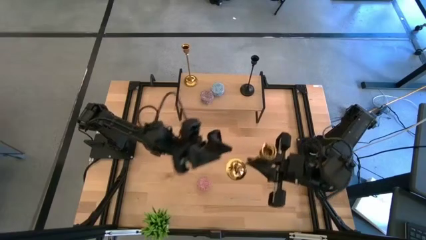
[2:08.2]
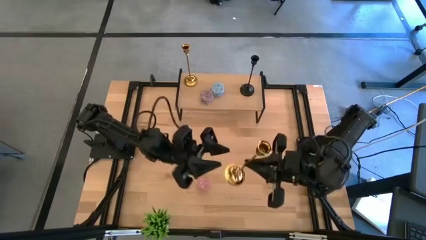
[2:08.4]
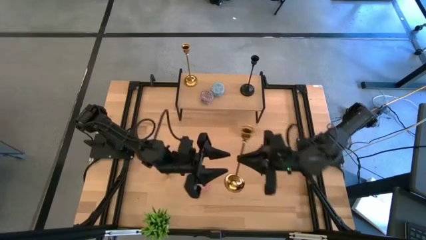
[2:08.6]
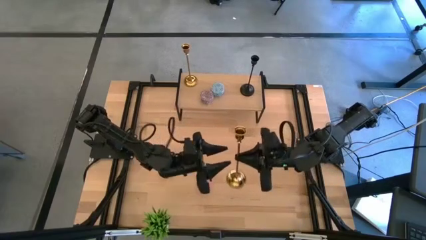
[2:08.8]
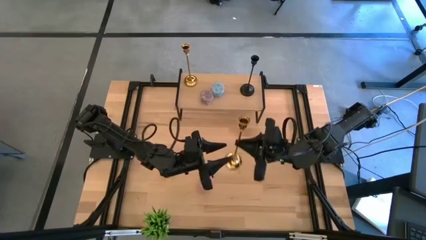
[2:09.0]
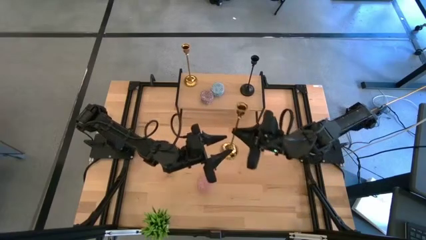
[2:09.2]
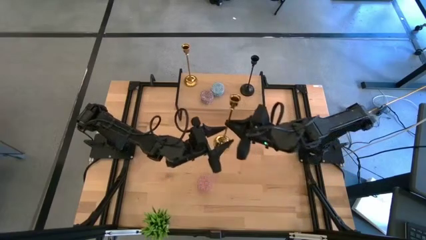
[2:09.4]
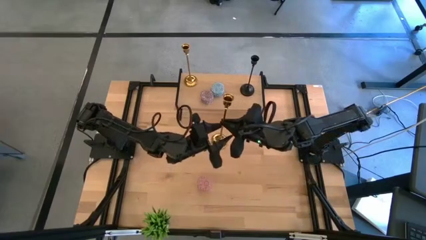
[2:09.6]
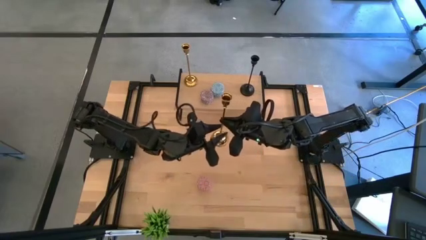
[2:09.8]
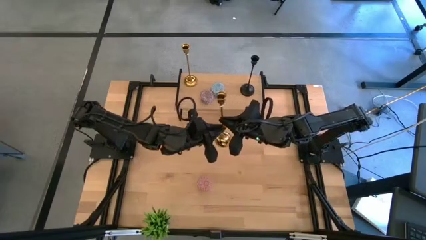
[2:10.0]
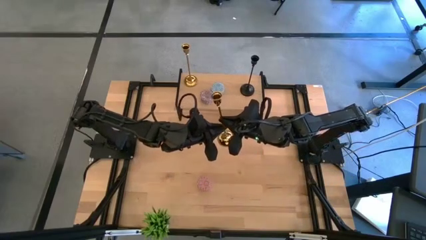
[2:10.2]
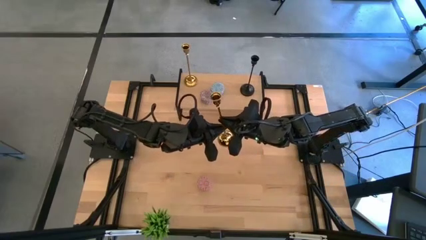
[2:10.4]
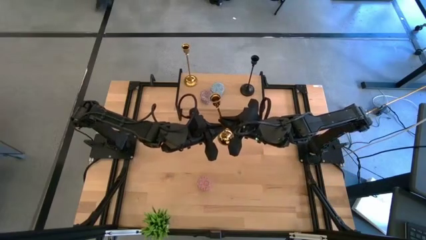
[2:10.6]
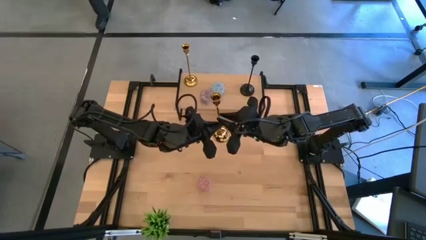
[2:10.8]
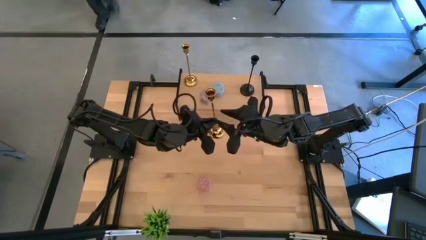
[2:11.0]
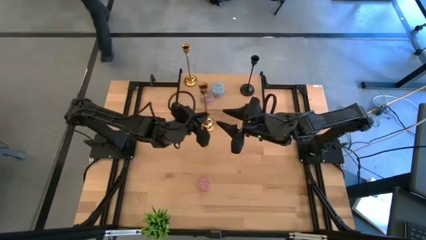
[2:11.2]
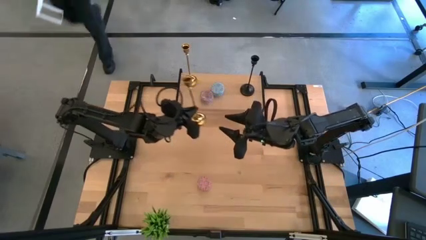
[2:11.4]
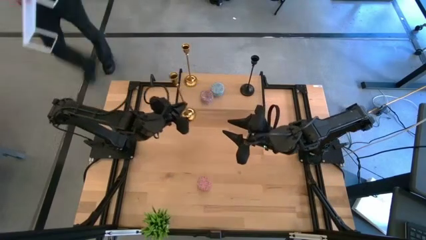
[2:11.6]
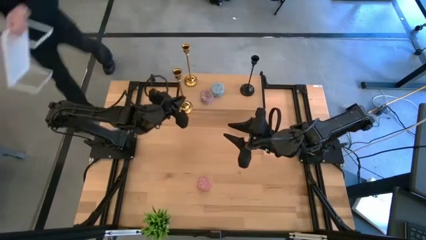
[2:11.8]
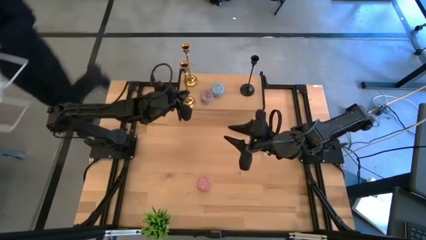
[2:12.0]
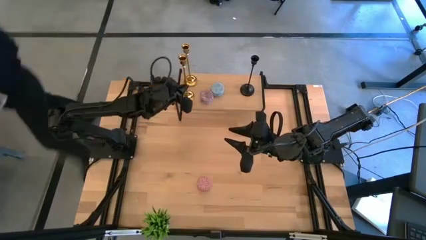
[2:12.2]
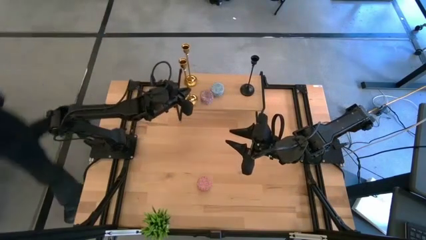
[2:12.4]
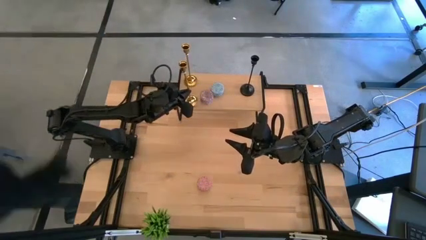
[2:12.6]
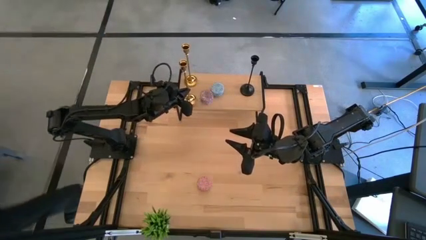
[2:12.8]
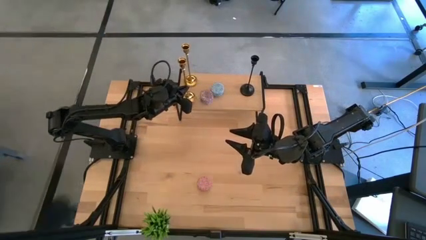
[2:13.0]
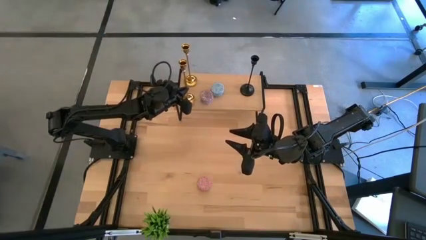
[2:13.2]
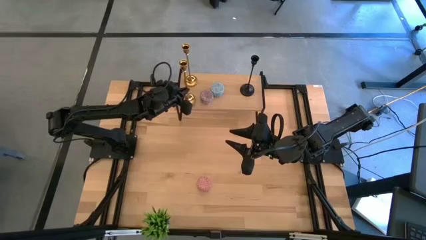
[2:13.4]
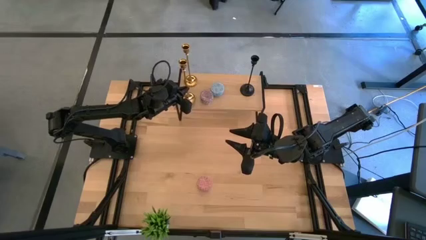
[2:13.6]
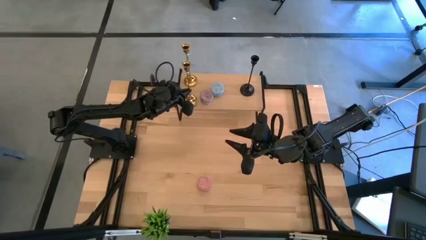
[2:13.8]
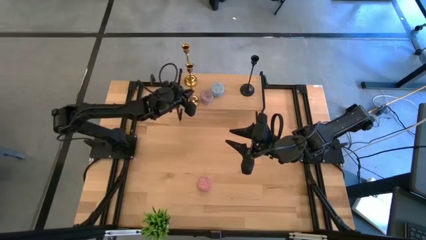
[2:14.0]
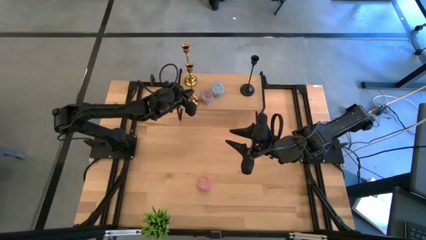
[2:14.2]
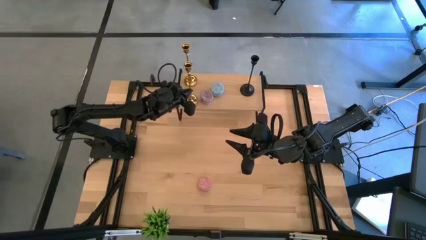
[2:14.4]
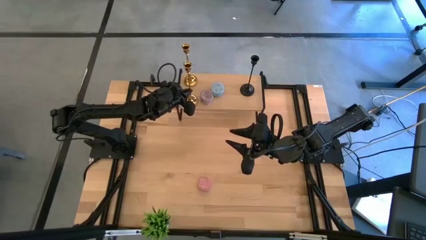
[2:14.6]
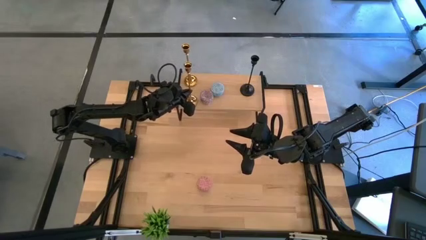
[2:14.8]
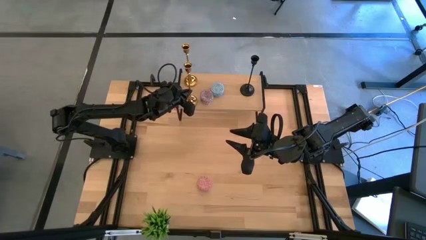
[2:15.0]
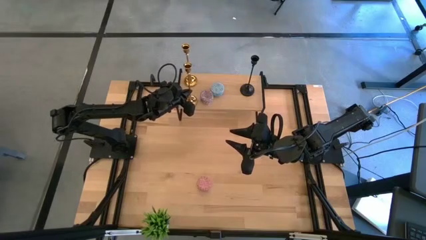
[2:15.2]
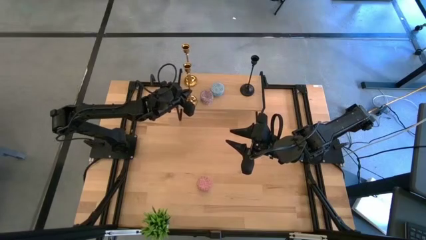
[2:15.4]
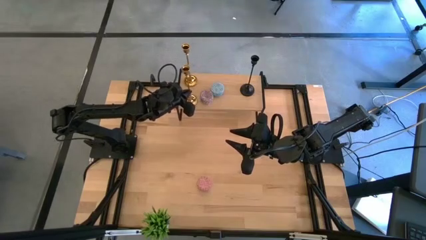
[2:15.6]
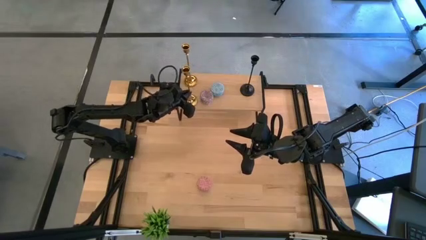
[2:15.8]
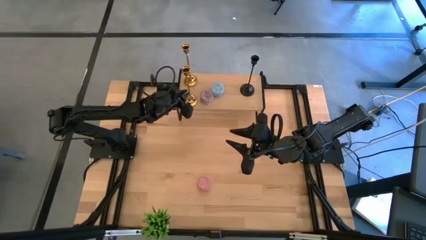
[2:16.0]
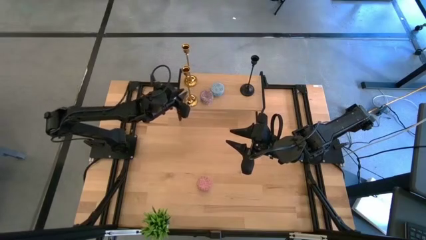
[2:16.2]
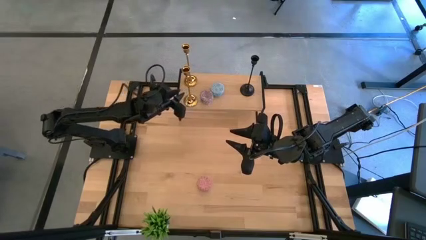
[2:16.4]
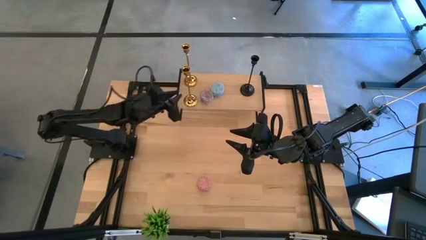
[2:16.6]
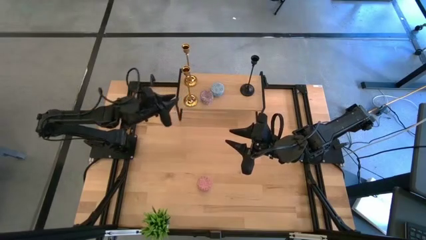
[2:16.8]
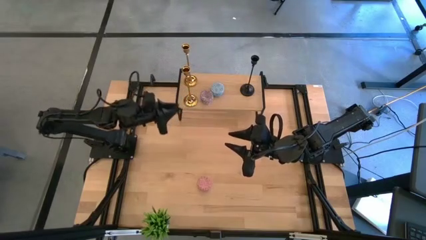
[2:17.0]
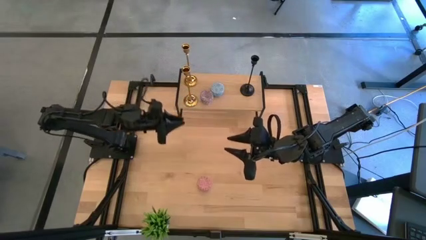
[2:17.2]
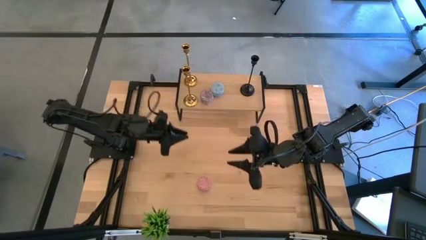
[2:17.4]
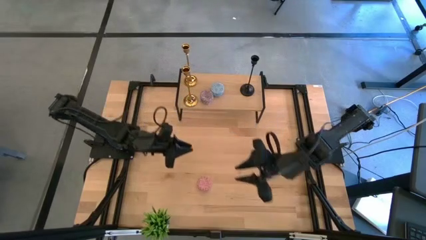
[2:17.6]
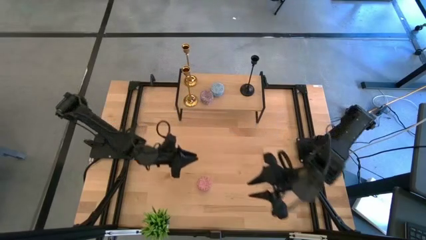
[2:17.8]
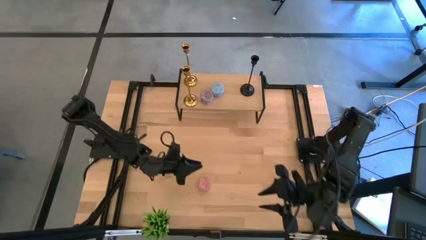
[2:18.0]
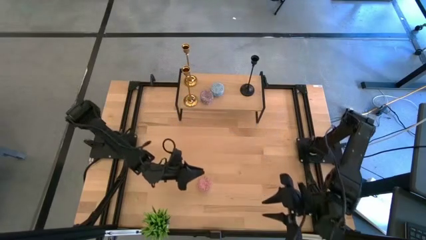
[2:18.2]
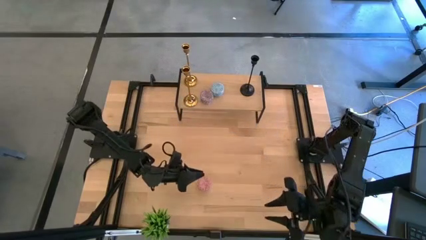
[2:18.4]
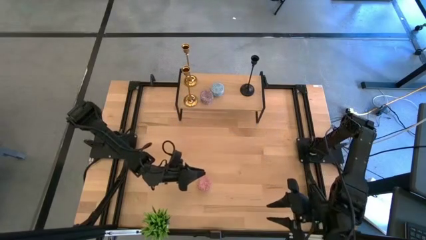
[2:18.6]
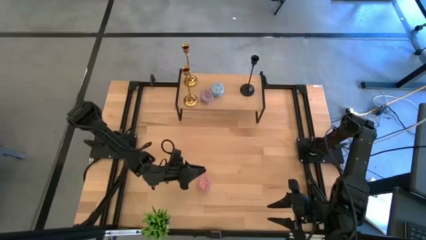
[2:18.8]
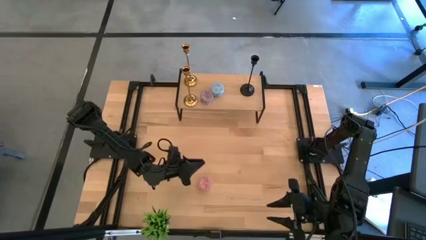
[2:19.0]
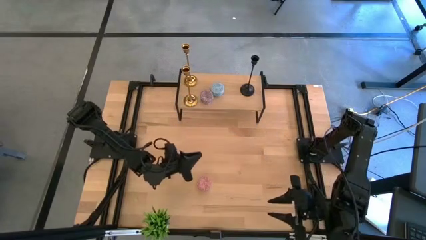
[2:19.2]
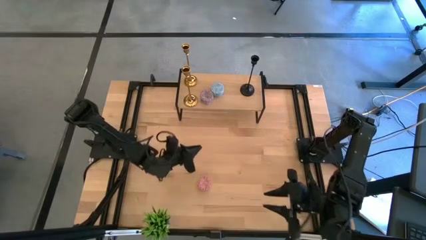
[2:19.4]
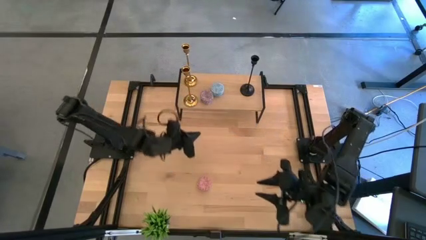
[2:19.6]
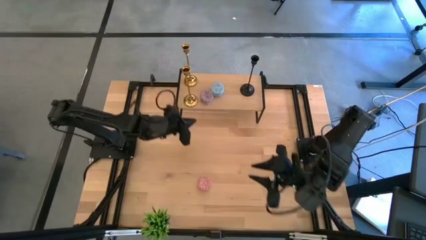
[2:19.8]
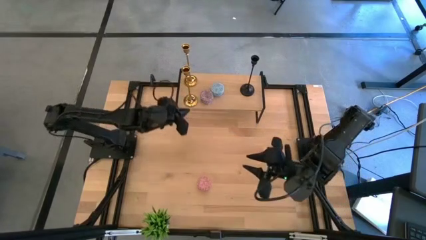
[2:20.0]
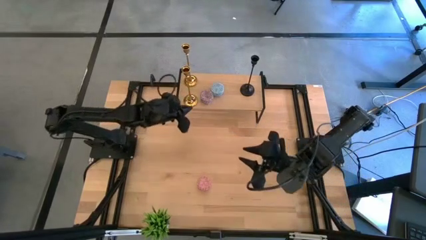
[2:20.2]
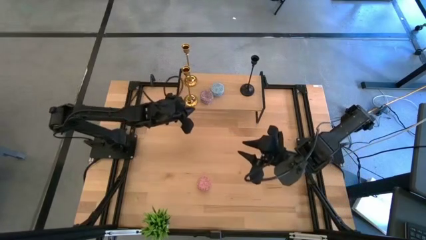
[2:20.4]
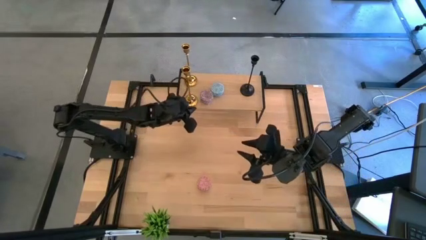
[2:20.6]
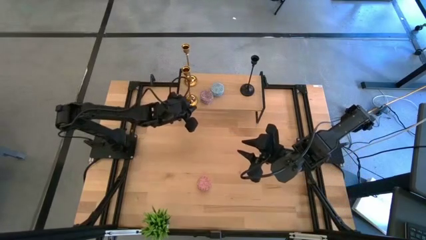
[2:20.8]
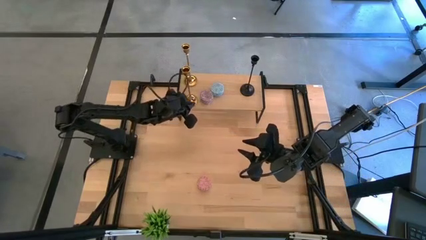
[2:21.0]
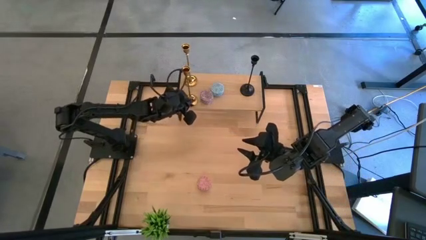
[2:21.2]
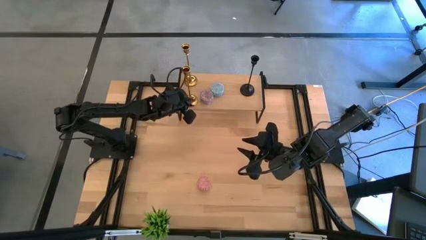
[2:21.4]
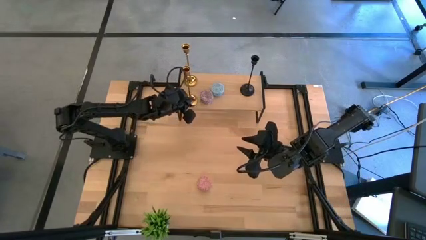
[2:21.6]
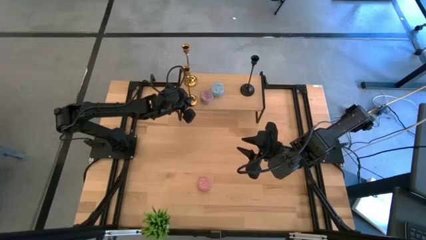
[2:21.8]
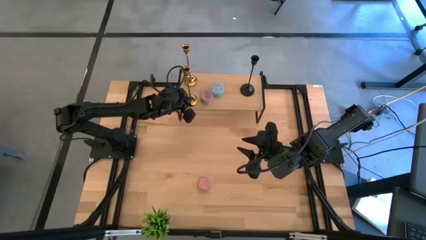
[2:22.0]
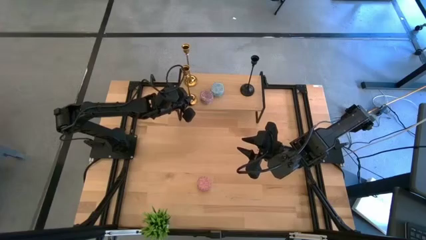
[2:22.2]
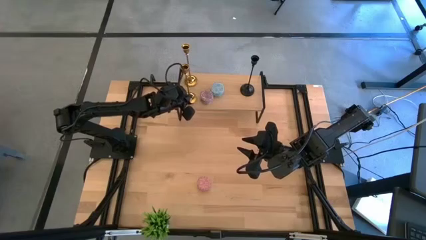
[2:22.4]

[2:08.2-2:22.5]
Task: Pick & Place candle stick holders
Put the gold candle holder on the shelf

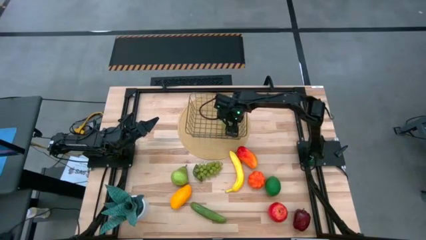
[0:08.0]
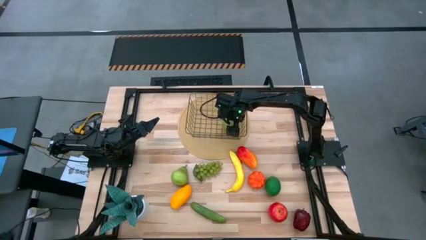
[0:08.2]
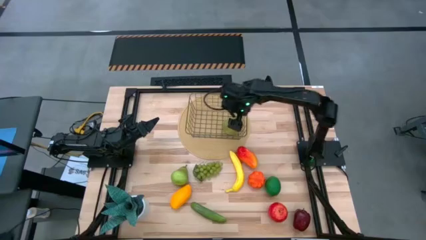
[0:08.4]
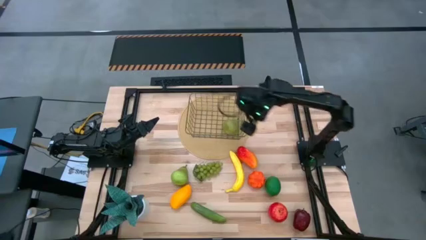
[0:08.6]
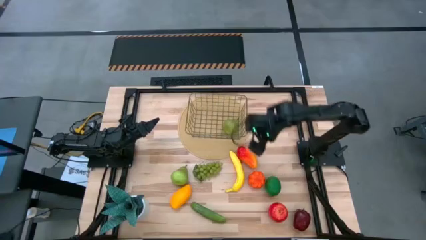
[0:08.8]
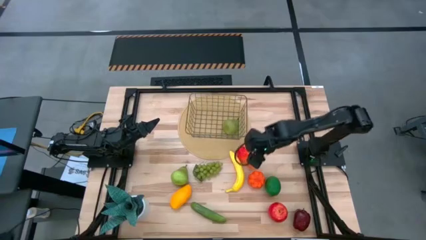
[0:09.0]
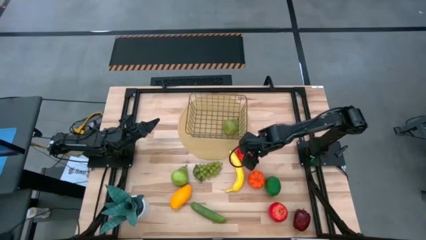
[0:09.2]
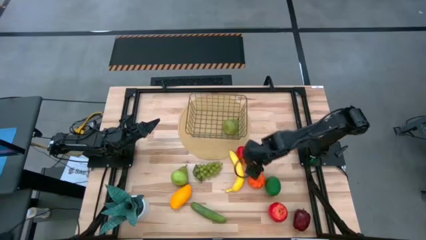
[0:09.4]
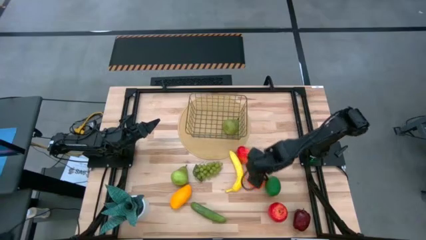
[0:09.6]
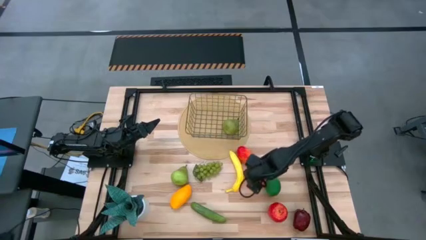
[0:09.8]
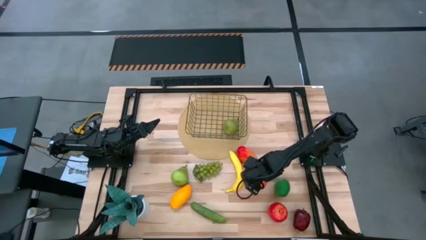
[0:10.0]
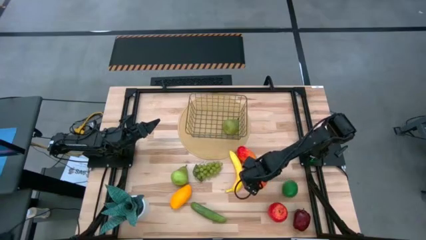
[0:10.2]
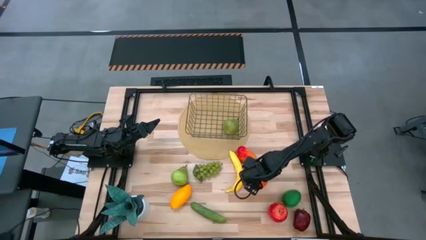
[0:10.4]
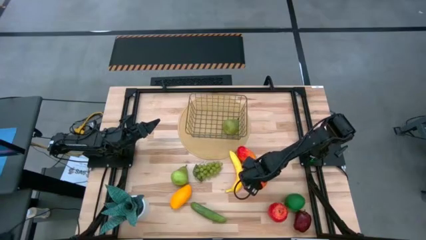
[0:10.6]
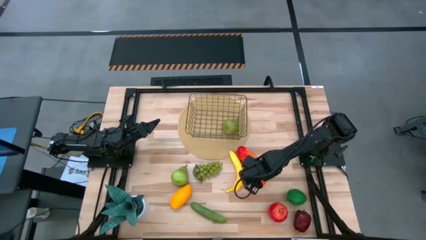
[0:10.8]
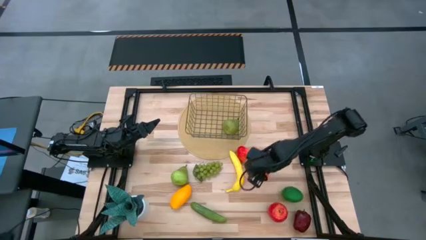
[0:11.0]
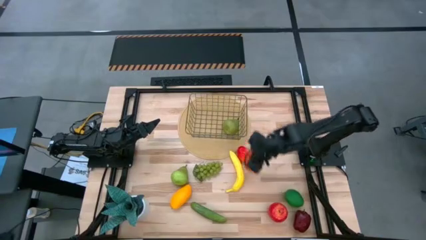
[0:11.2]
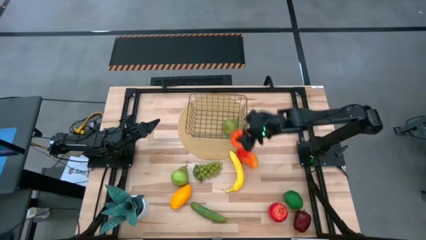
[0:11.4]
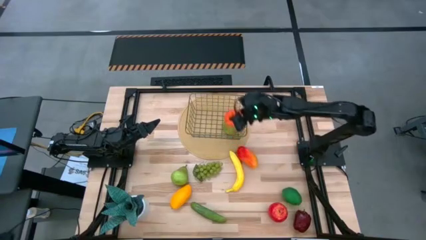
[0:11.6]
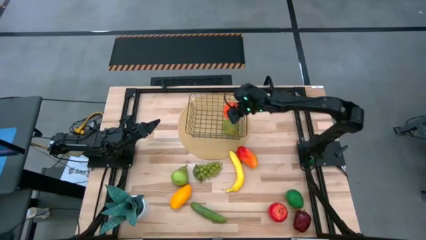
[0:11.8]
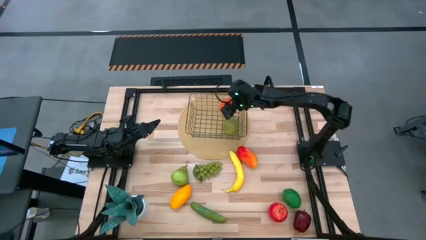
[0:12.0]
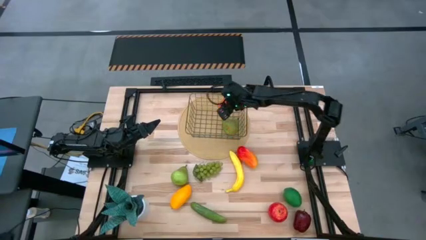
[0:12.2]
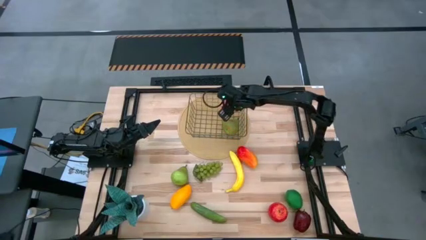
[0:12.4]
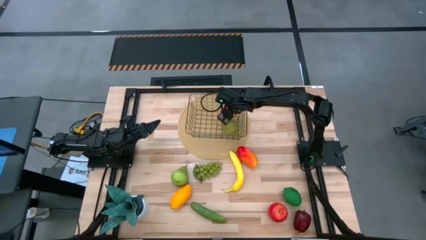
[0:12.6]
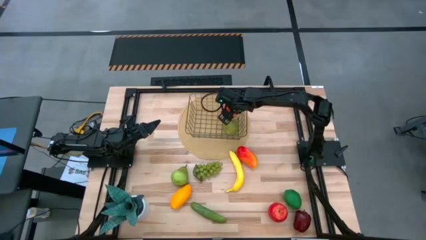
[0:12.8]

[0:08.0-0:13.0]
Task: Build produce basket
Put the squash into the wire basket
